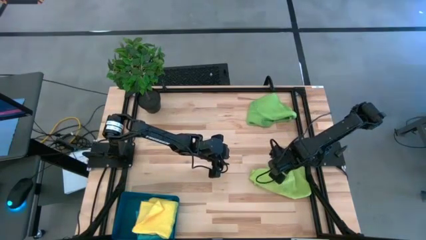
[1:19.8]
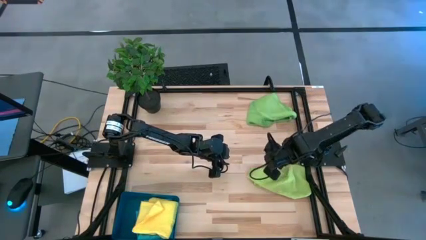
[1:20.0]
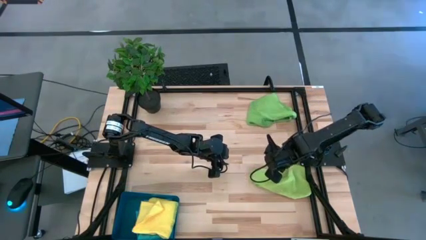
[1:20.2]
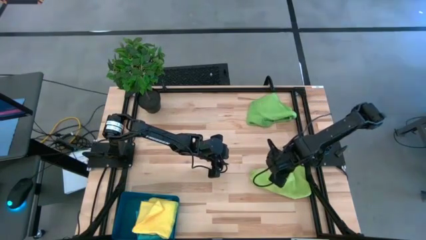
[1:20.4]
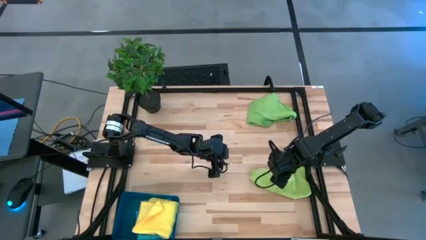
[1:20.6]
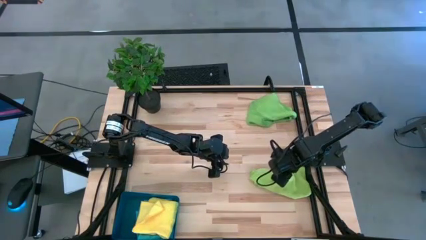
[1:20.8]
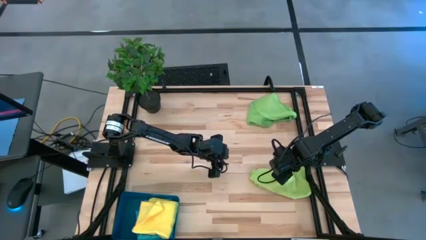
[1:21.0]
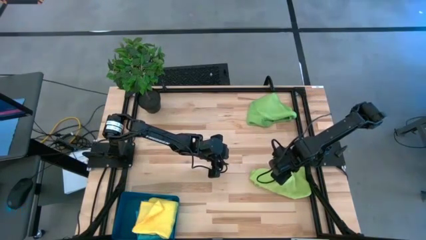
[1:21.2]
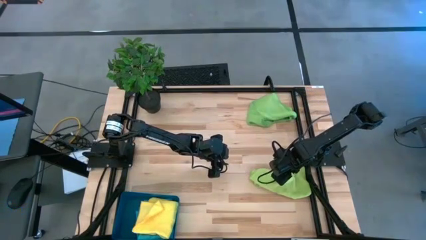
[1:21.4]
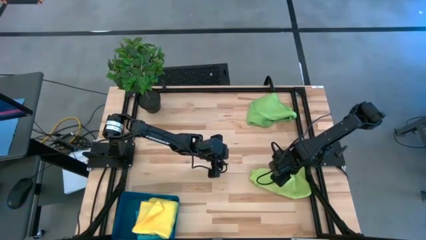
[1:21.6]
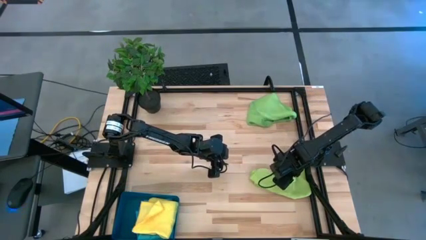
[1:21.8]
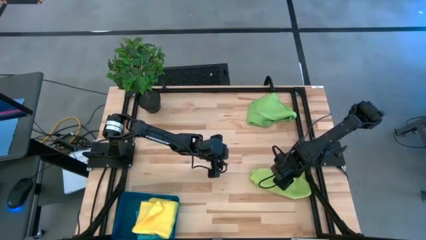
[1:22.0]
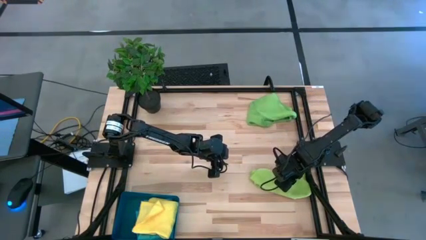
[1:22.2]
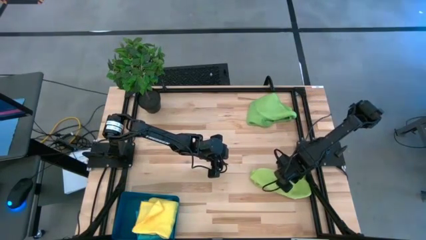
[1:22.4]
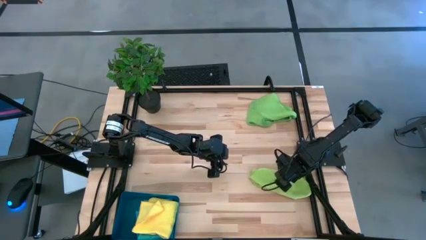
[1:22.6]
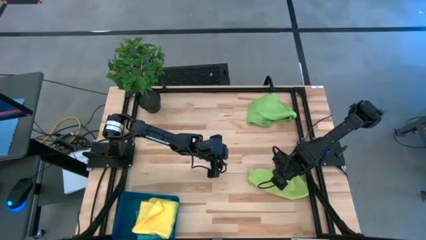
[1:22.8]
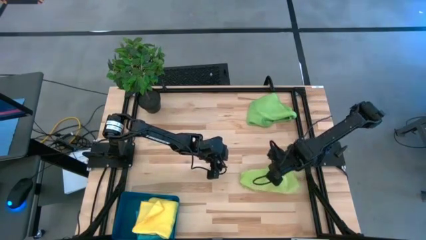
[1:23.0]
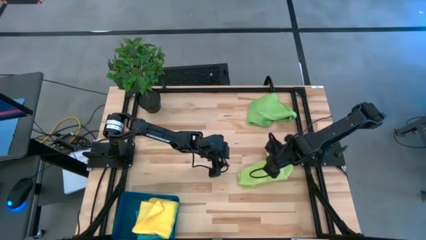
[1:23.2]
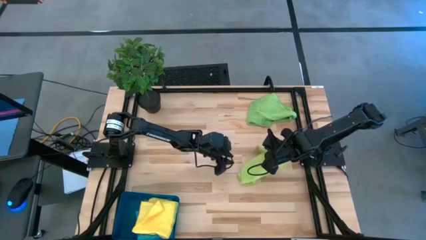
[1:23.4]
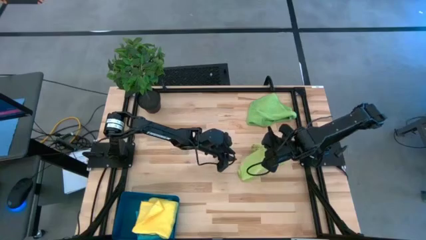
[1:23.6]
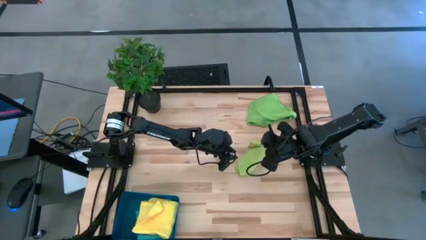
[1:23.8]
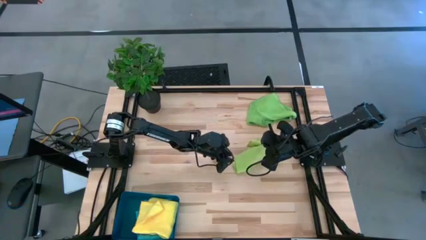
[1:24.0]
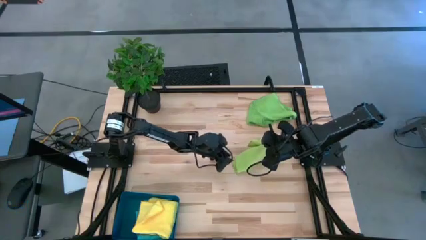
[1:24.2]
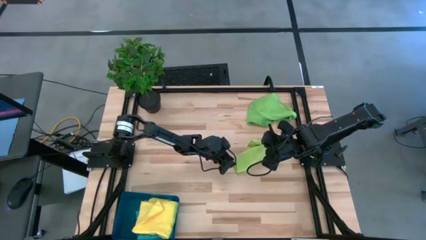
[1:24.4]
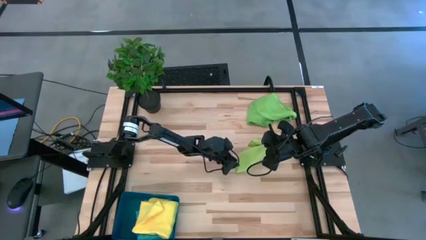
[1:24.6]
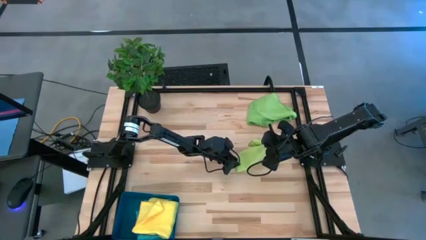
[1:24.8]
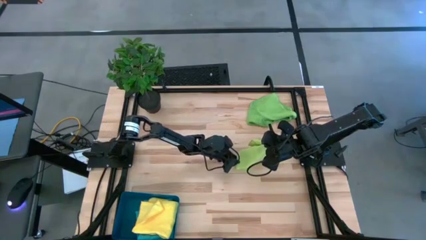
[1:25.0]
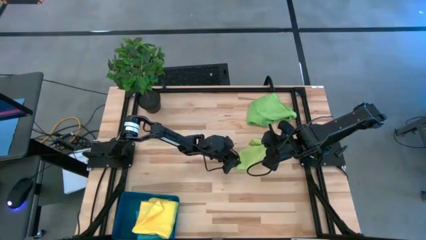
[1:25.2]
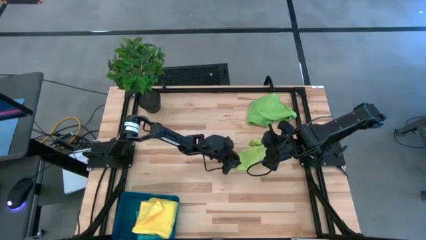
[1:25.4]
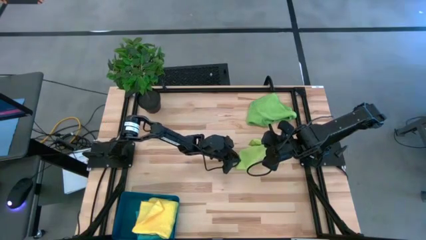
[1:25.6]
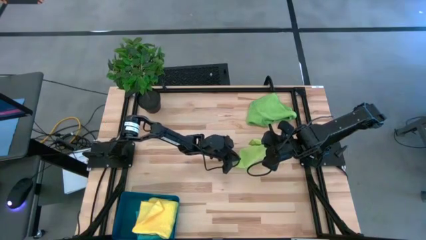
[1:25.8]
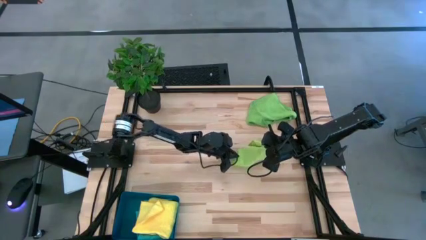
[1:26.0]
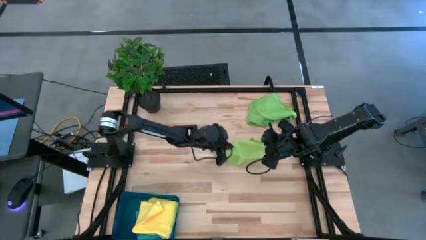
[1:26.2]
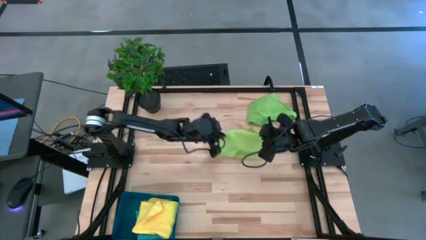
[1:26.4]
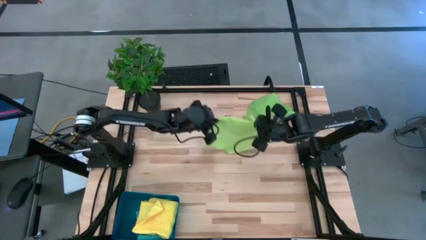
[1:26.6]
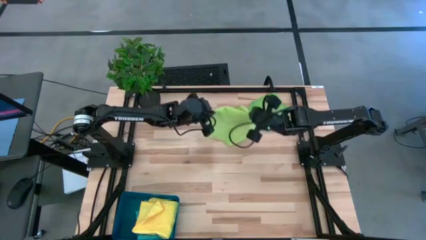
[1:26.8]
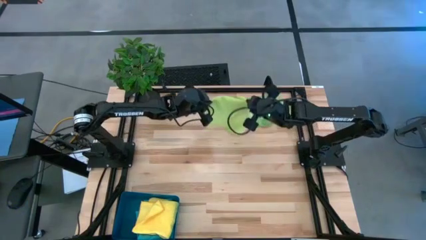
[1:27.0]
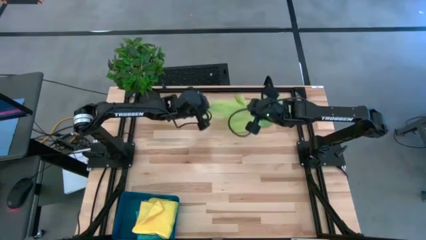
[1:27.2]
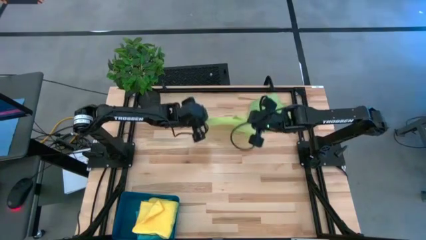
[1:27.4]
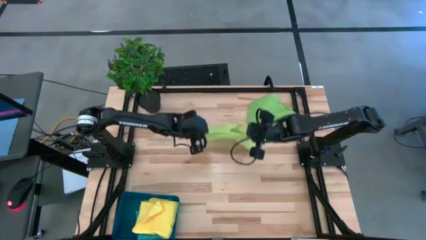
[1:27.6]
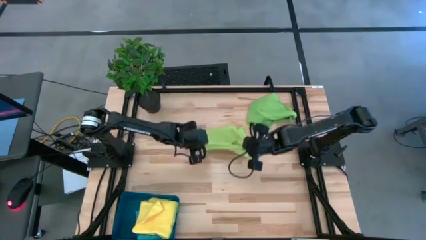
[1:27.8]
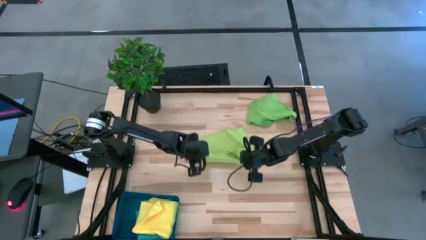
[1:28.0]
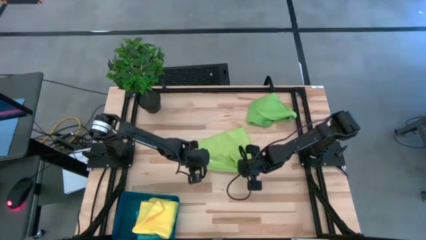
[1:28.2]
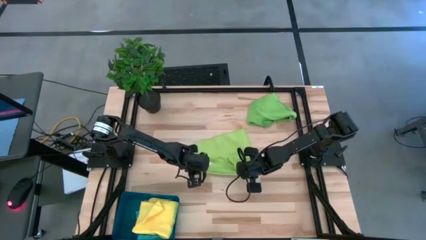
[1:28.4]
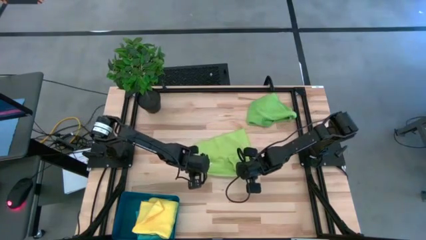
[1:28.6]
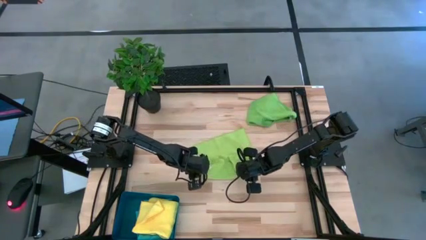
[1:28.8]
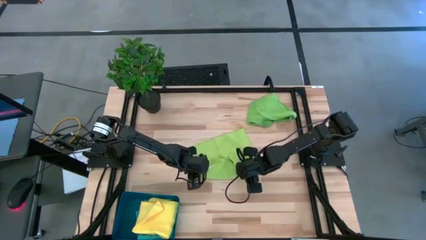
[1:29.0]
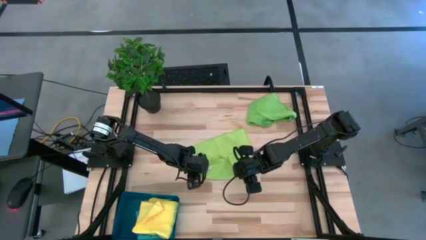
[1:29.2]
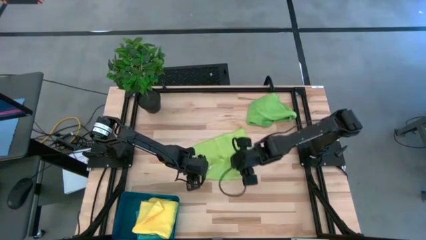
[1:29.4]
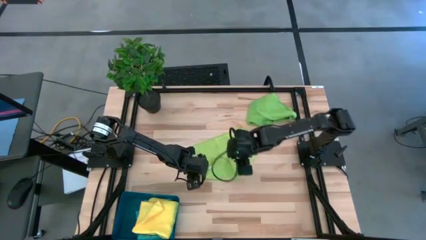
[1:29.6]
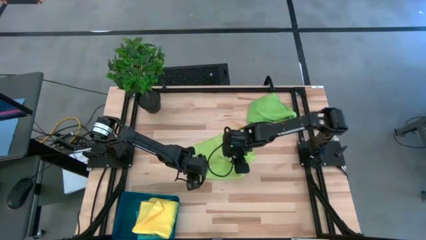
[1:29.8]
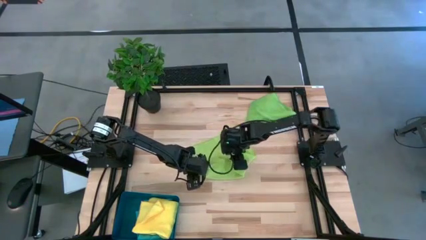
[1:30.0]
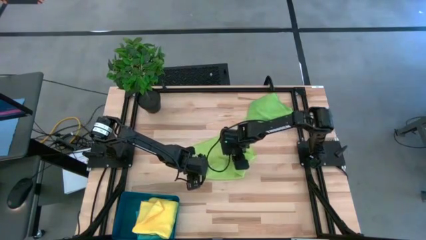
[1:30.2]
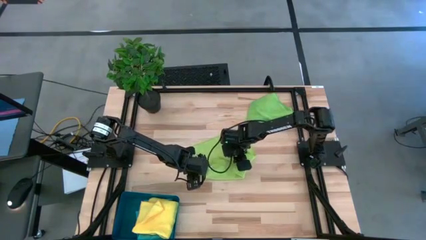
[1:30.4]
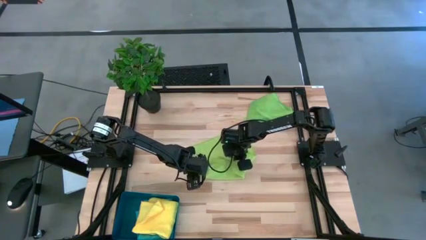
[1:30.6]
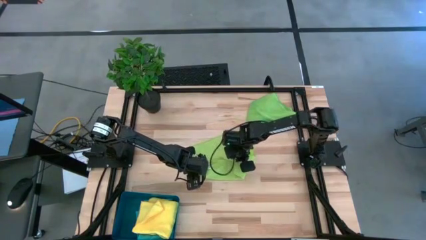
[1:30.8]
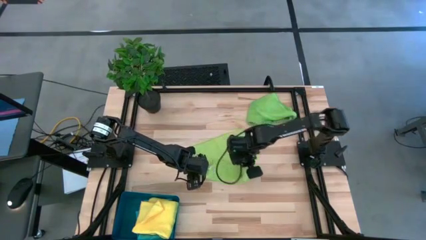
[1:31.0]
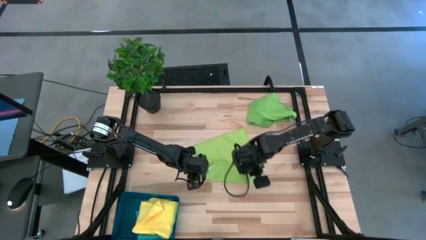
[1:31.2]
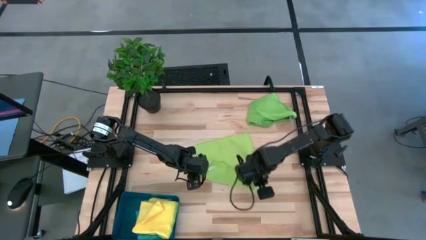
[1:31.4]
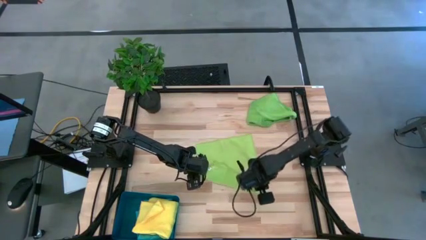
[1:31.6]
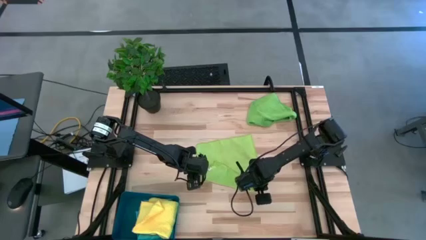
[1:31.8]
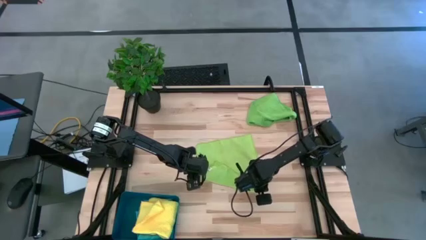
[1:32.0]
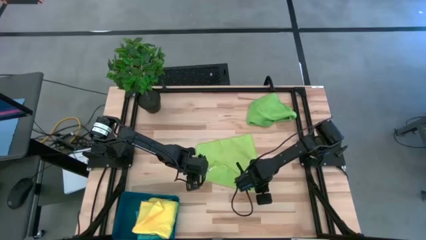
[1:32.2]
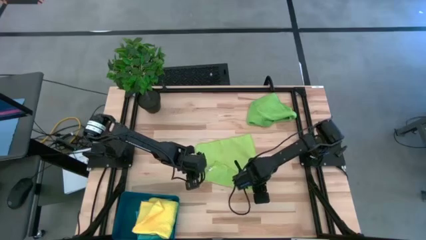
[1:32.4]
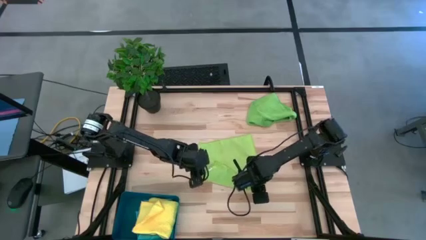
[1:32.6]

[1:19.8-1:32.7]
Task: Fold microfiber towels
Fold the light green microfiber towel

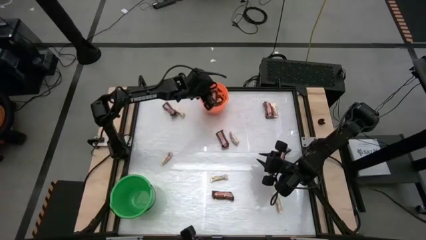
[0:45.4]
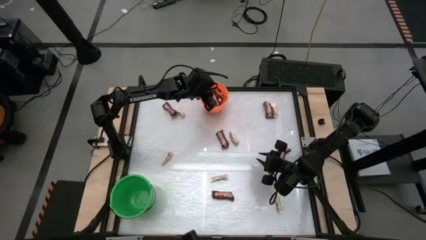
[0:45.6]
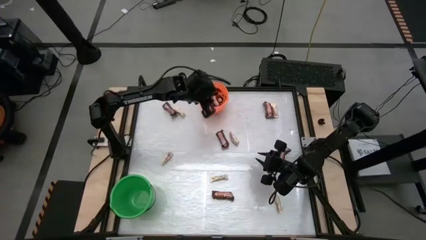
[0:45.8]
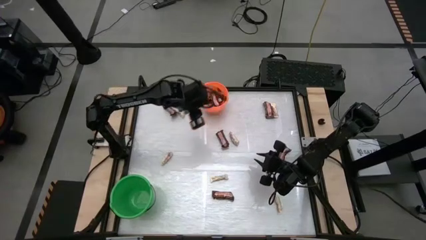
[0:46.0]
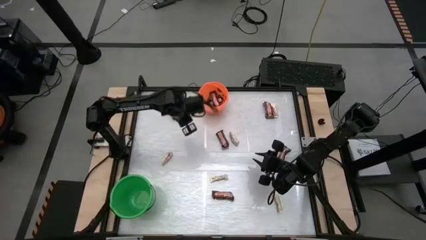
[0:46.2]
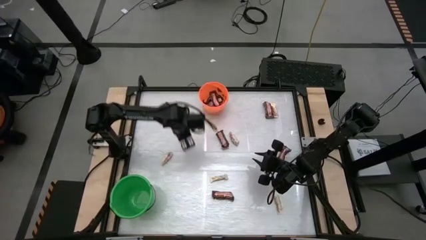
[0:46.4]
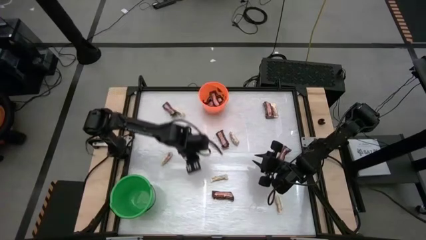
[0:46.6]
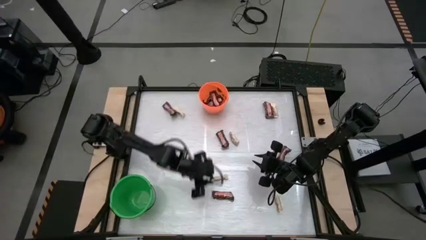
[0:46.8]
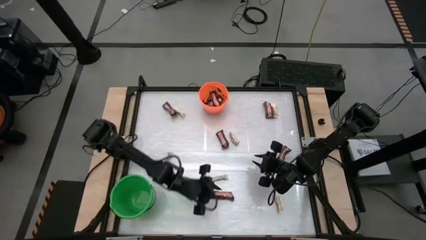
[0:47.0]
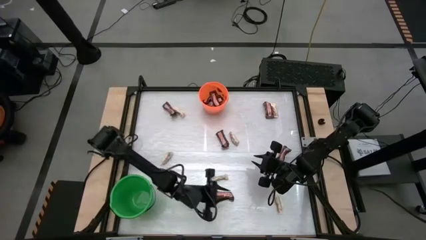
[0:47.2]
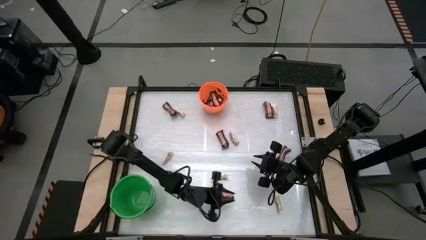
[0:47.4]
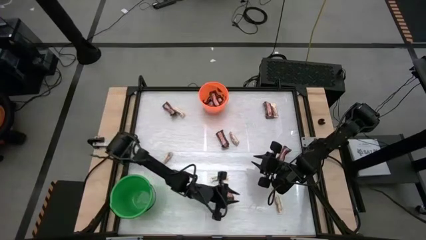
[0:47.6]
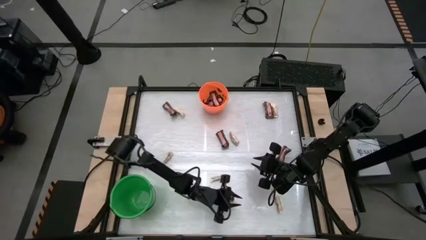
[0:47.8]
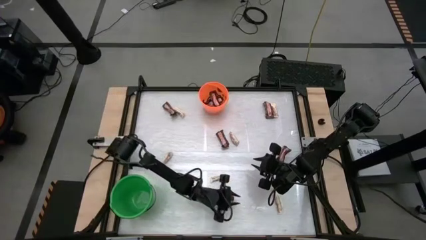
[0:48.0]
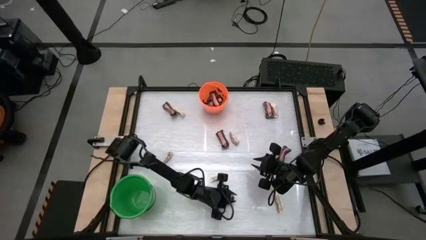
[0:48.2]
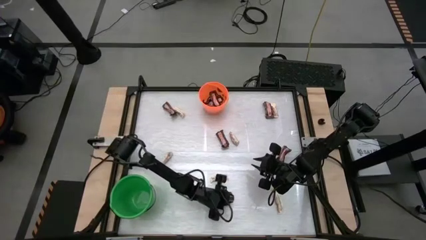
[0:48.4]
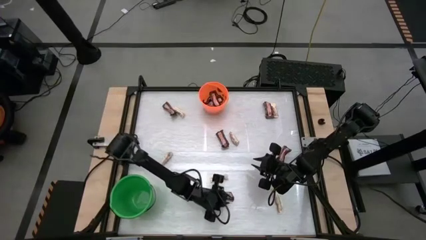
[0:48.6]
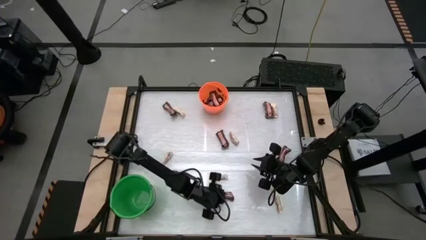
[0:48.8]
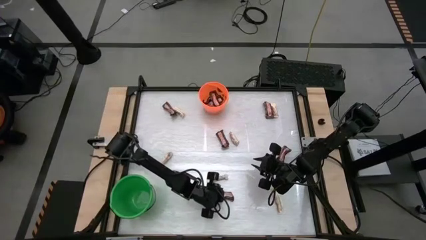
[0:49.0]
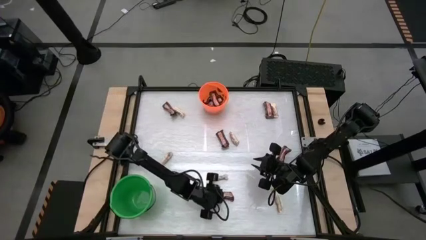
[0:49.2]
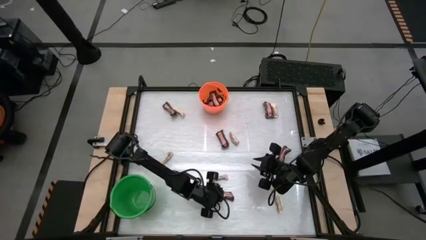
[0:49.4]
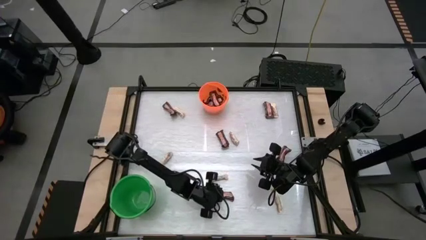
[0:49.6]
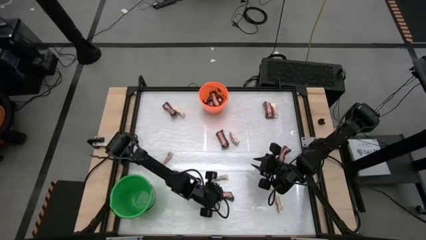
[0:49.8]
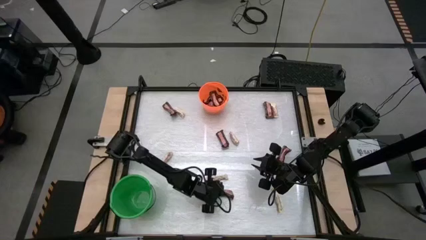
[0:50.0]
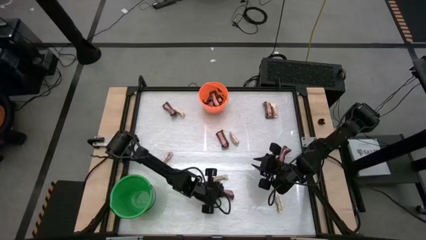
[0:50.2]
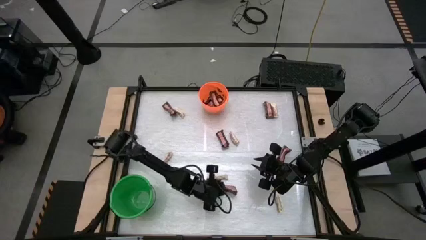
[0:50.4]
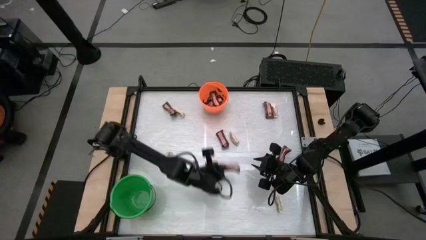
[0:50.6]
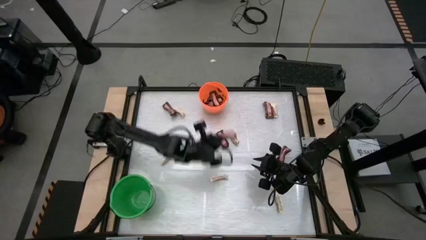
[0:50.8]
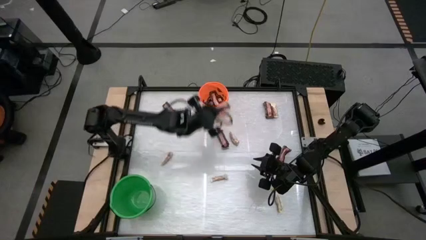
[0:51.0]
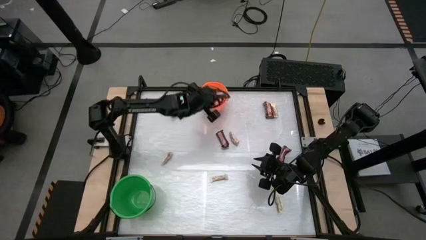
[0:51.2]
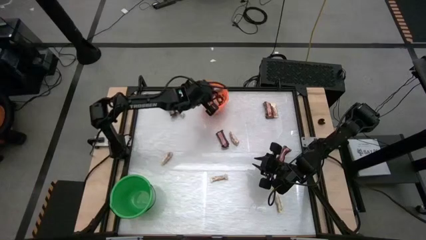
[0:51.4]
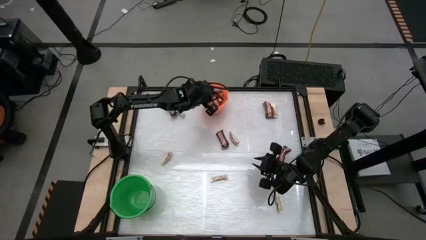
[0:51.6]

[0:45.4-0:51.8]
Task: Sort candy by brand, put in halloween buckets
Put the brown chocolate bar into the orange bucket
